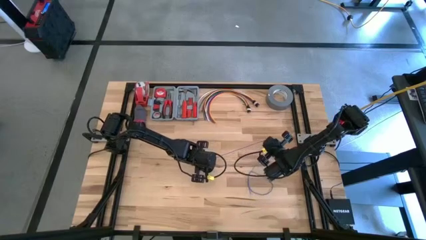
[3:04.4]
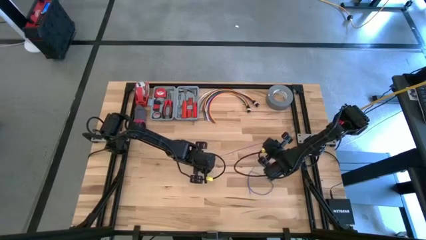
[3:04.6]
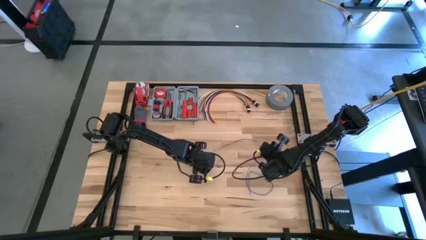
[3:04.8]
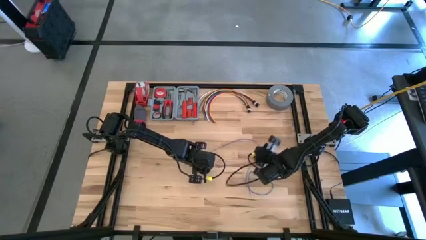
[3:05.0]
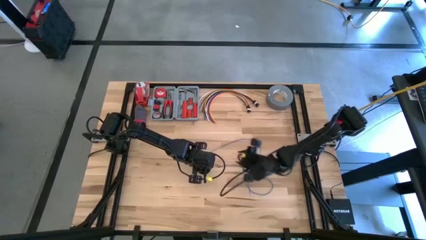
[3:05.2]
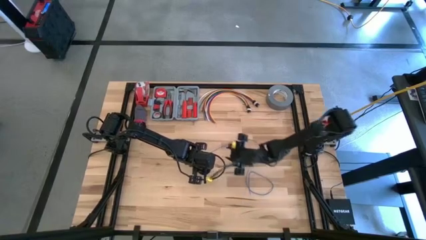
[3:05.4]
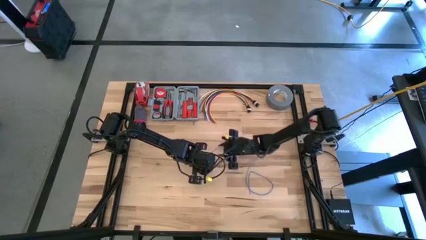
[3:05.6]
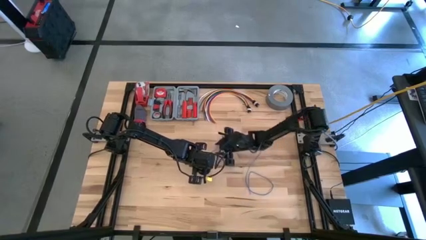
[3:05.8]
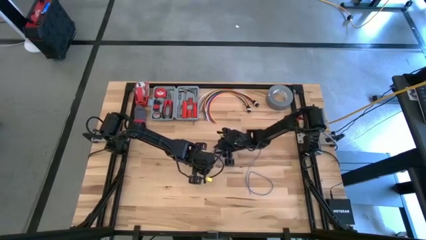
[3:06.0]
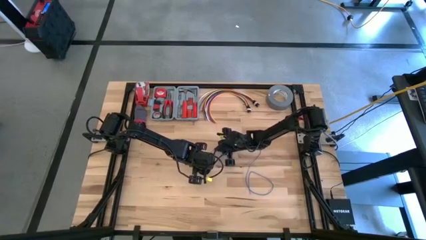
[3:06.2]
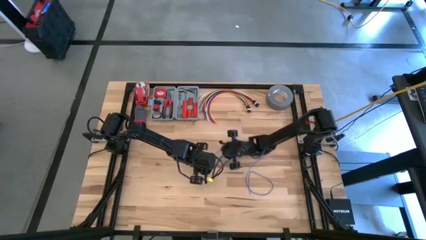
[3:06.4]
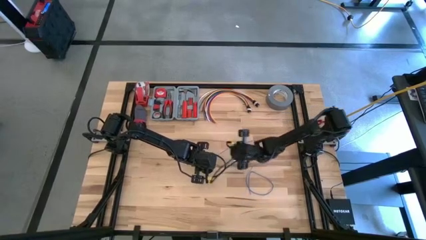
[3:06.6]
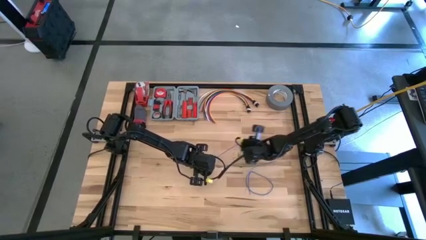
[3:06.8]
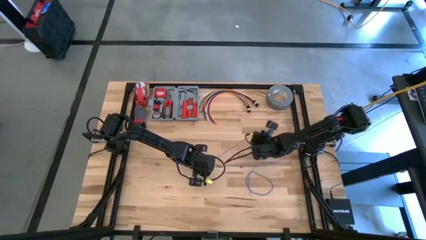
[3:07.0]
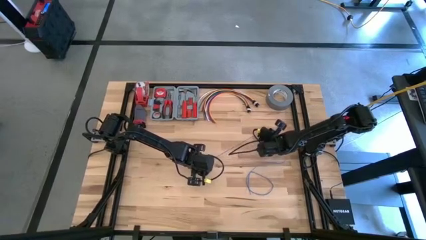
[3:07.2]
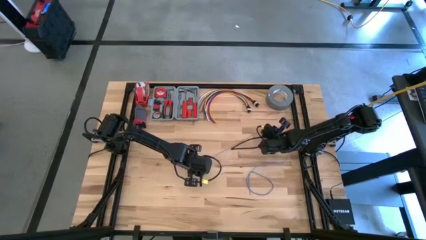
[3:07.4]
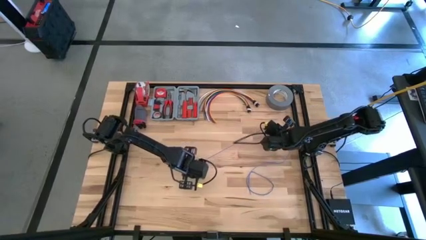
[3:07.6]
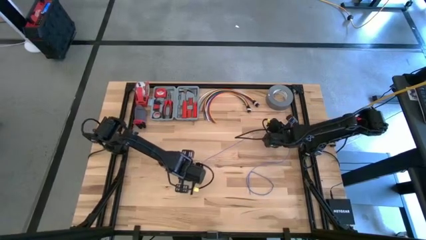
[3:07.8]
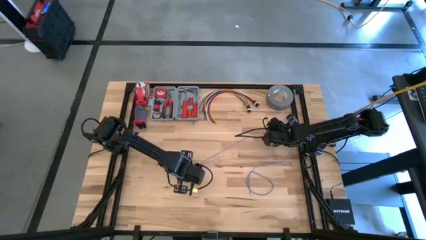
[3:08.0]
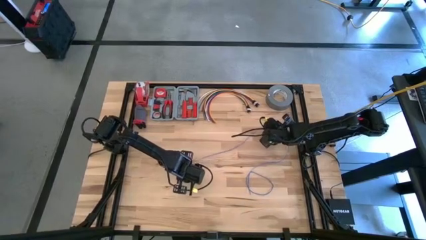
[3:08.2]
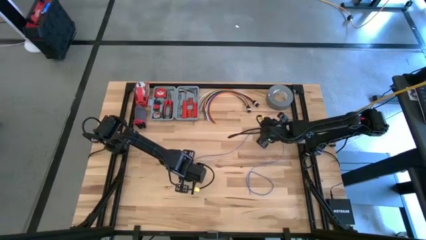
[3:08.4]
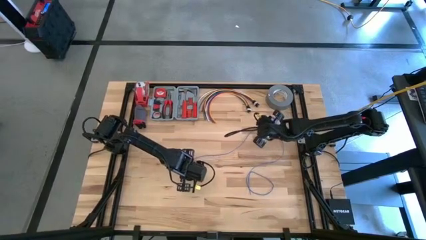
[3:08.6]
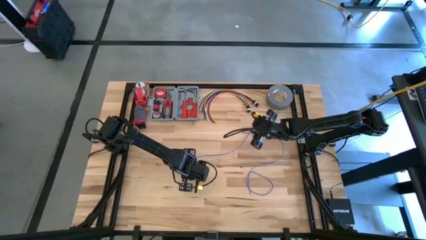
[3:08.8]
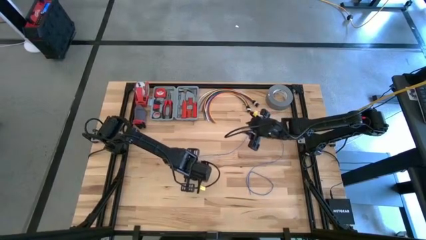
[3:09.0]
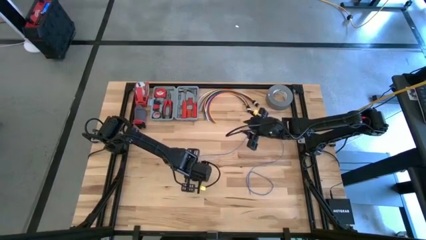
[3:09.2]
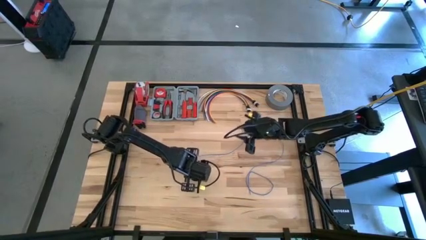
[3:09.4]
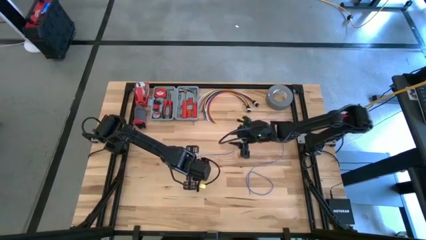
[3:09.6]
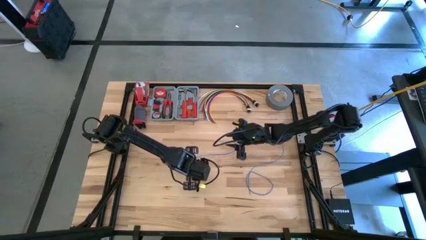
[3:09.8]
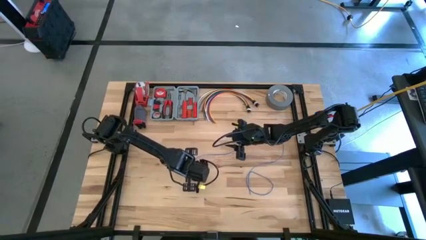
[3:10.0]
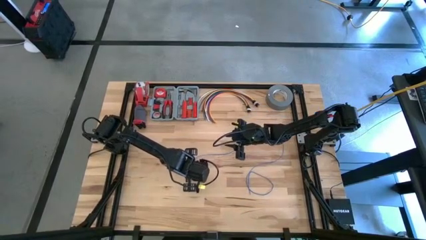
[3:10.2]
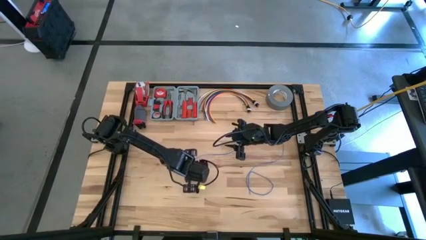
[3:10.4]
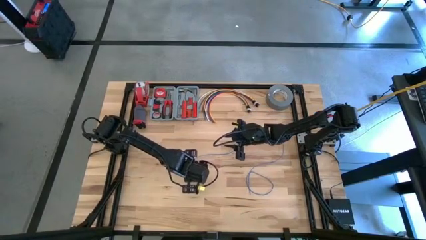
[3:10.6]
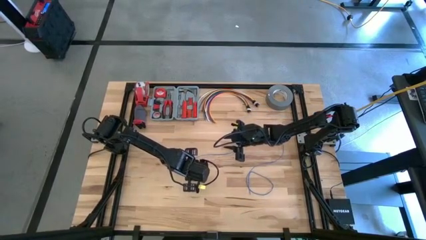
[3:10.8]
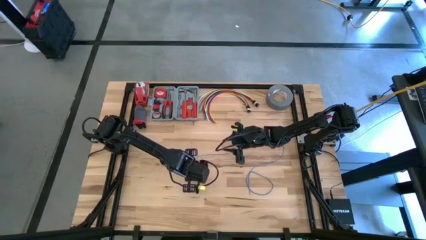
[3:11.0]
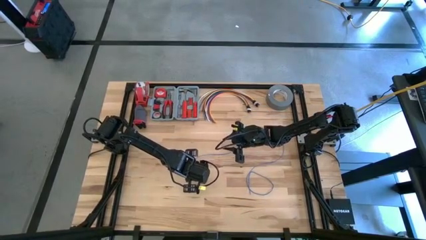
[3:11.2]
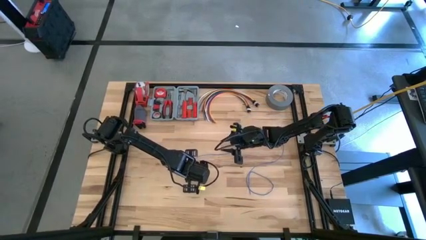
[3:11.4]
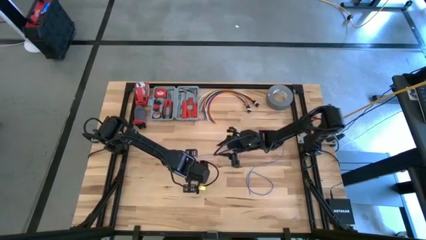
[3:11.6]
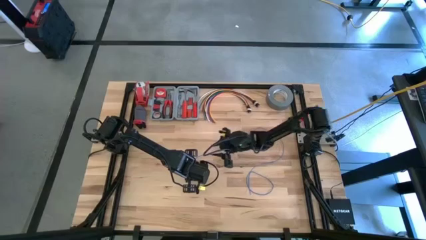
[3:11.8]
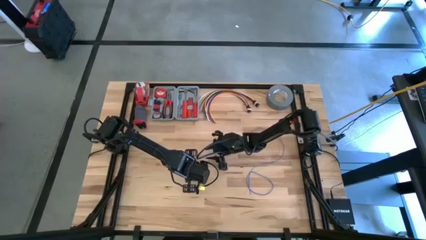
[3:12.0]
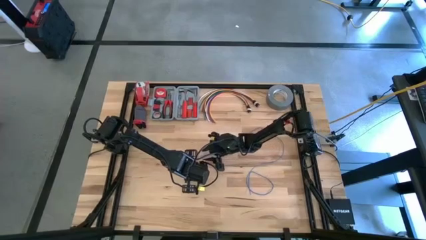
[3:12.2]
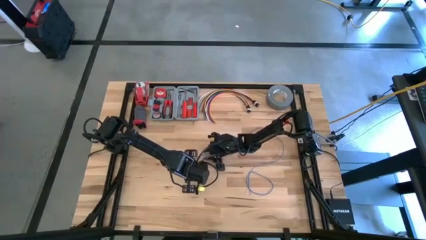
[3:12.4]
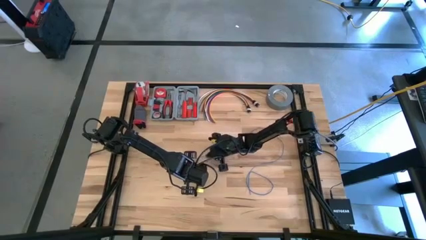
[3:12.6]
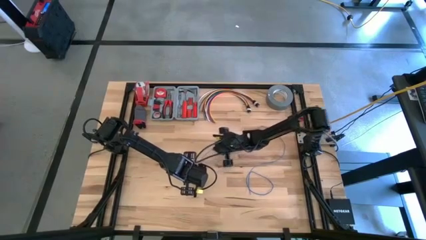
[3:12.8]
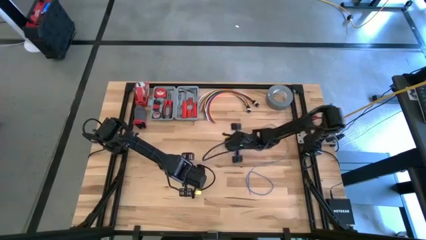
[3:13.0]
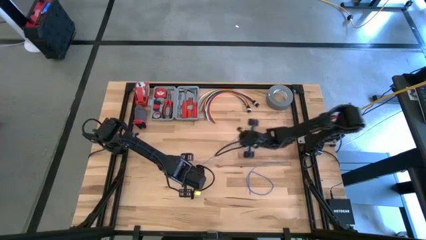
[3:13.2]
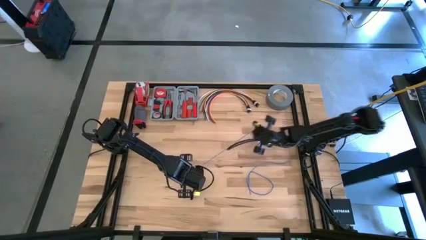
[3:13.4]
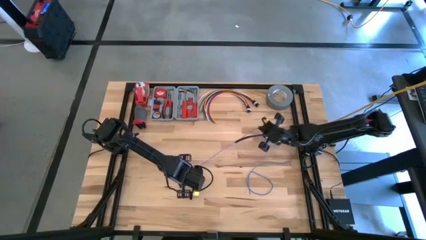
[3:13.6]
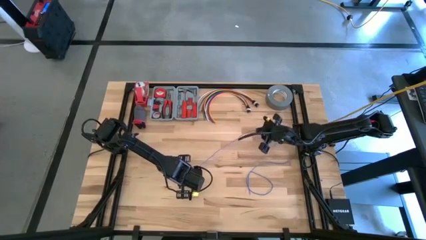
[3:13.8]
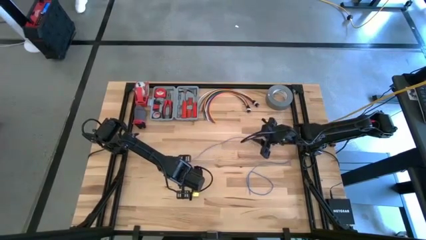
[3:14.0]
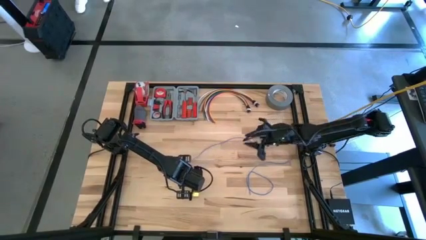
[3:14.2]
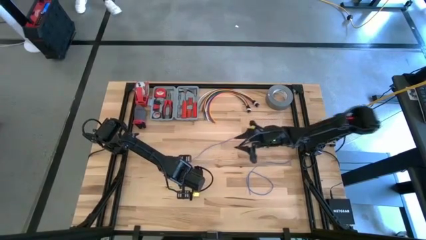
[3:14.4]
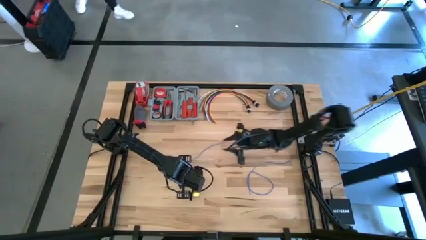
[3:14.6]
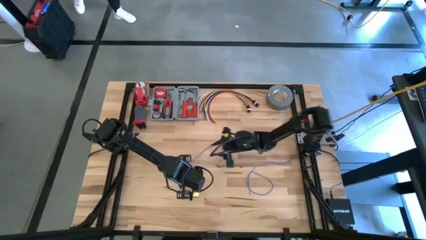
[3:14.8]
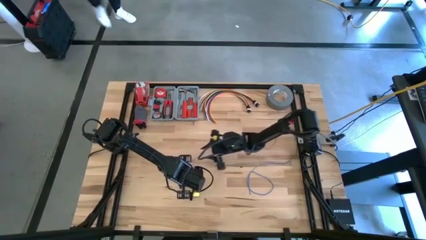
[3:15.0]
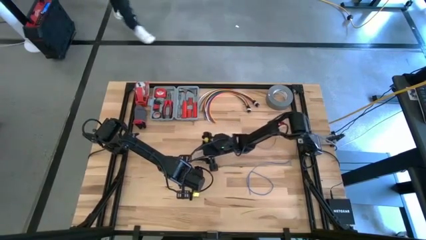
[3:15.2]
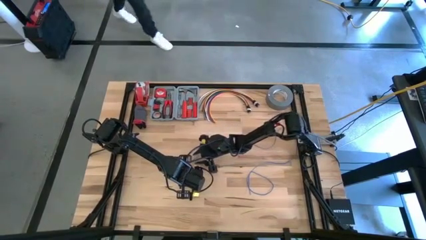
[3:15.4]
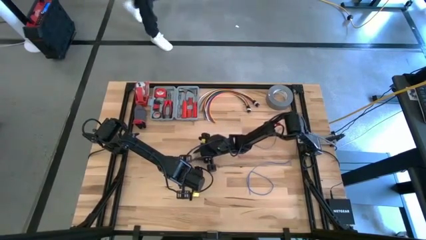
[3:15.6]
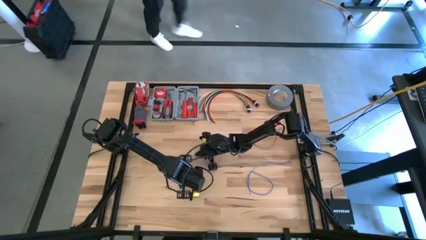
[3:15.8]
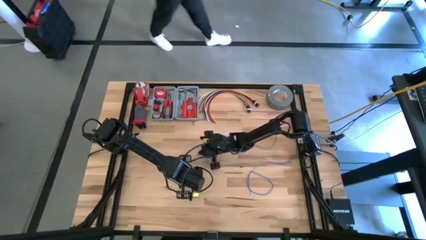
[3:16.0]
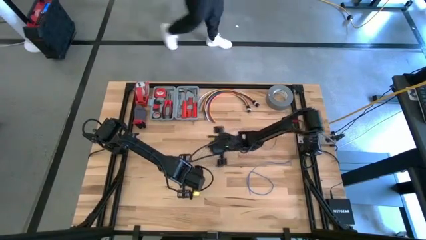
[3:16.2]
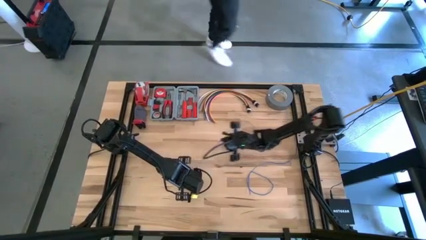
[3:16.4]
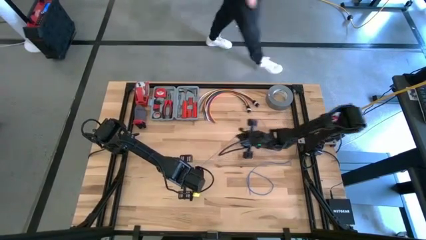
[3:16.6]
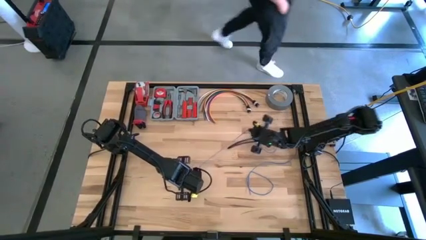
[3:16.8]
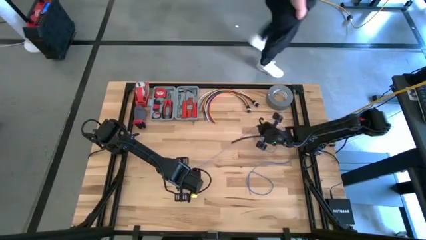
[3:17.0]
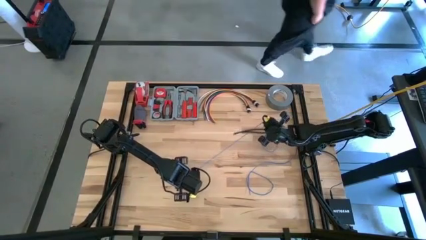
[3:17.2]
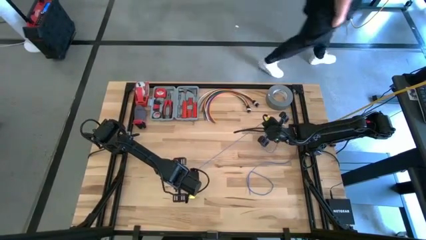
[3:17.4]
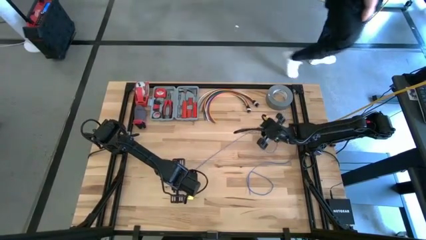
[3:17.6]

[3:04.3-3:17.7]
Task: Coil cords
Uncoil the blue wire on the black spool

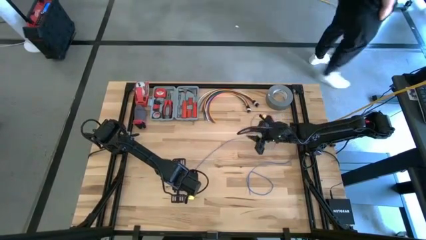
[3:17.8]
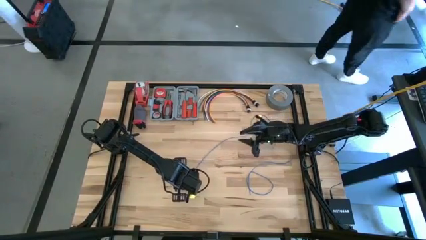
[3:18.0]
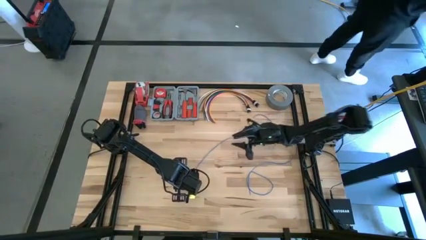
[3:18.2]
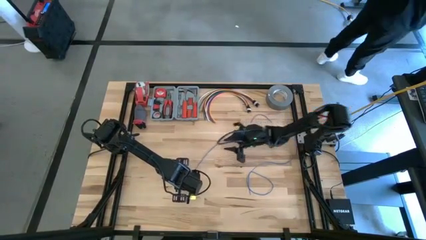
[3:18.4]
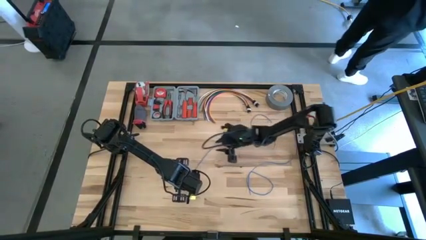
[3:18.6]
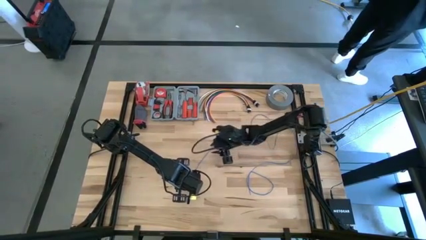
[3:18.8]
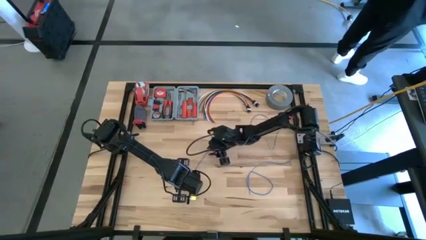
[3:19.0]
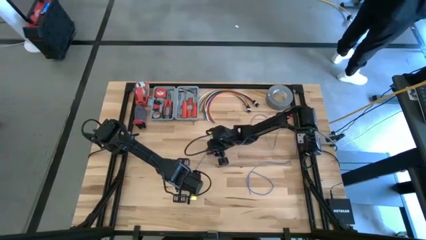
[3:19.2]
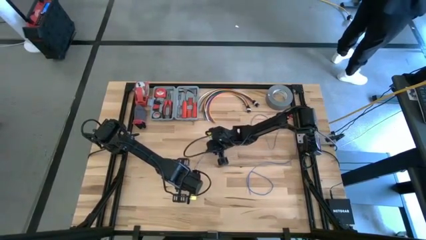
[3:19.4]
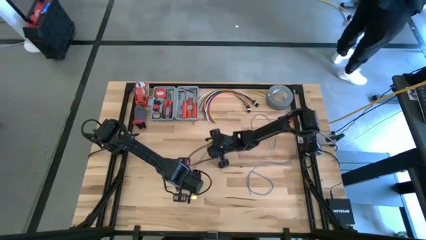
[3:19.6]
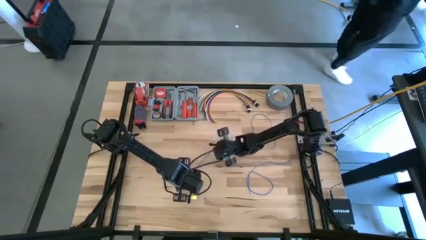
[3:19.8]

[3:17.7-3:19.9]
Uncoil the blue wire on the black spool

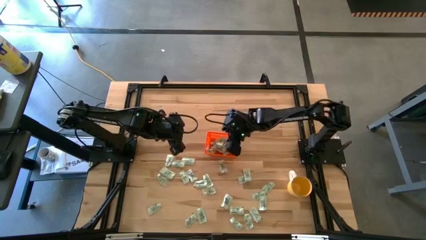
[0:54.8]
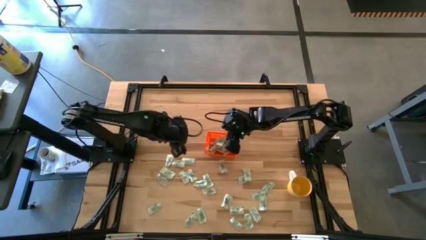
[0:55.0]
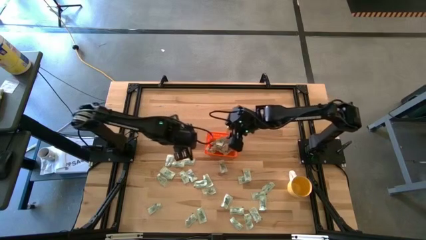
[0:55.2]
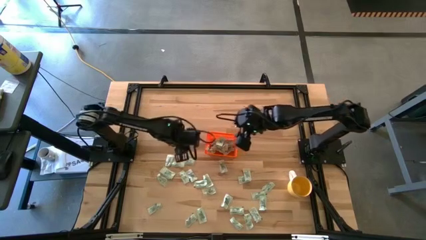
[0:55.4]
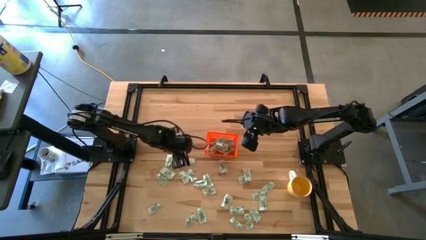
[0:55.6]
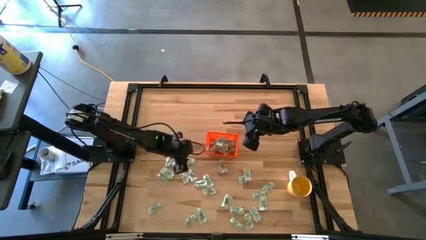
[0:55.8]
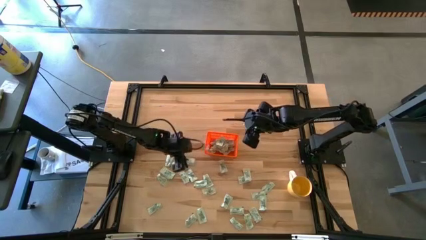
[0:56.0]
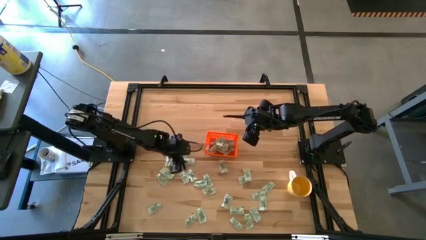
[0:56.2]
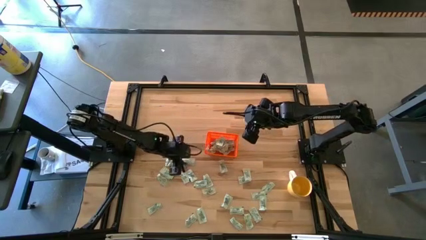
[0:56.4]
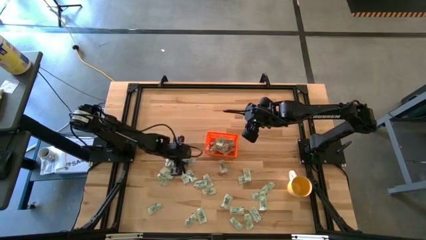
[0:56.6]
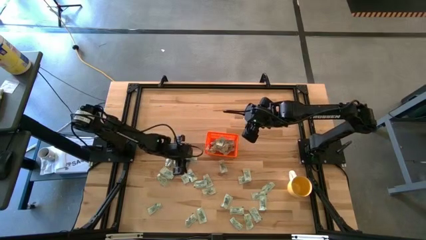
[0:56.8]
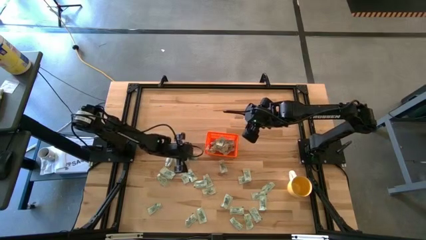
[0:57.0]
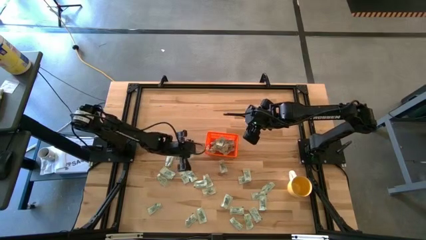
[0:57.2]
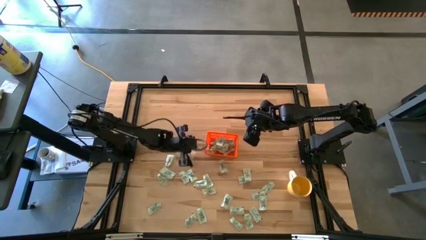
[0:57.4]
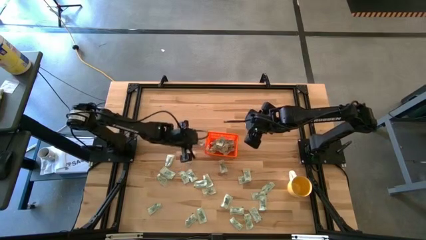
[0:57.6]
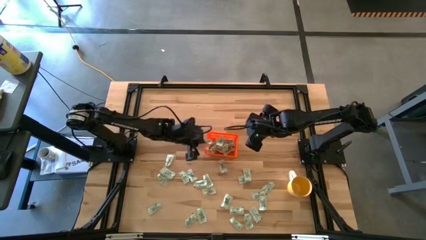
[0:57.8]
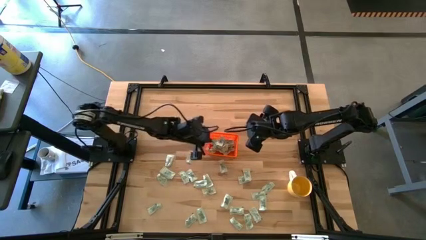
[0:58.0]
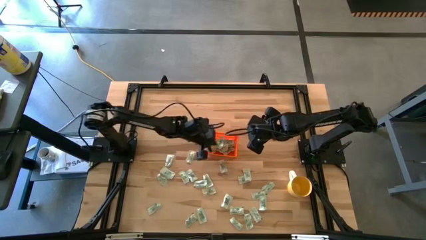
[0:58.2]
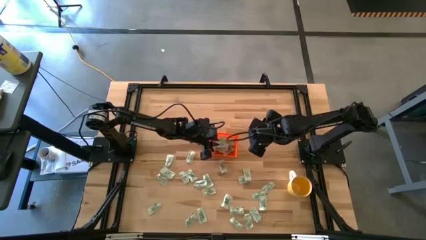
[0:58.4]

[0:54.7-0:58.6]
Task: Pick and place Stevia / Truvia into bins
Put the light green stevia packet into the orange bin
